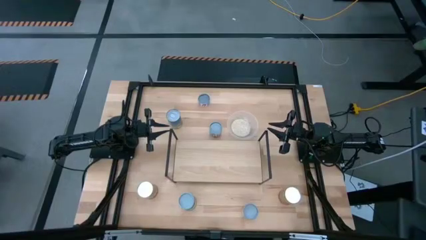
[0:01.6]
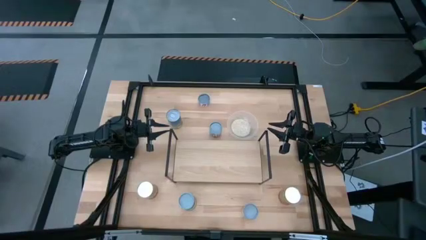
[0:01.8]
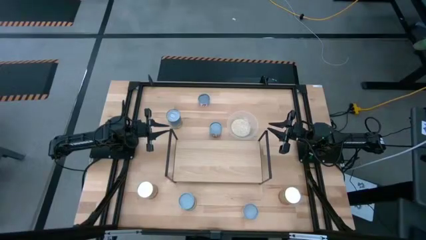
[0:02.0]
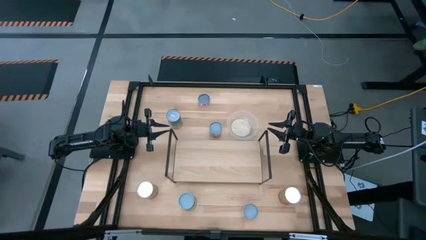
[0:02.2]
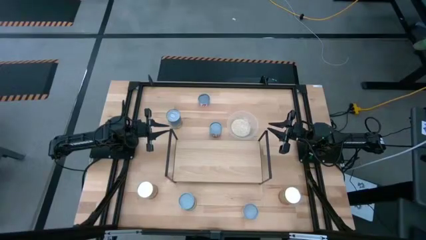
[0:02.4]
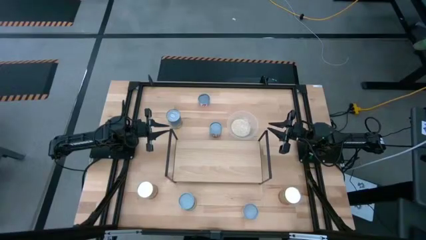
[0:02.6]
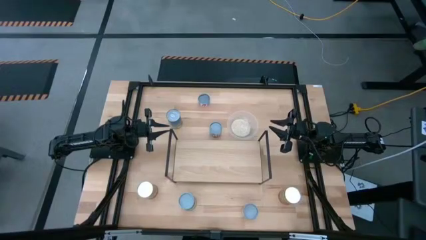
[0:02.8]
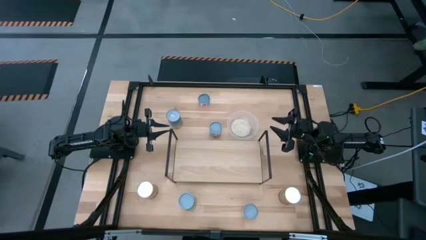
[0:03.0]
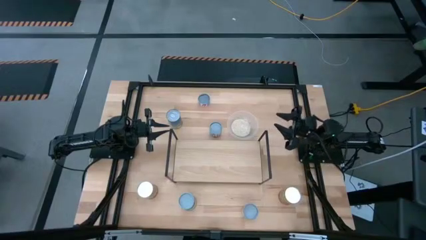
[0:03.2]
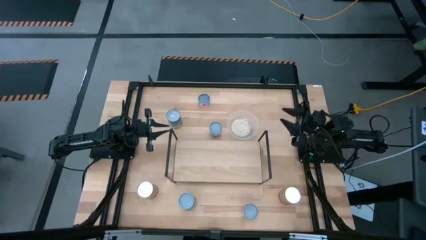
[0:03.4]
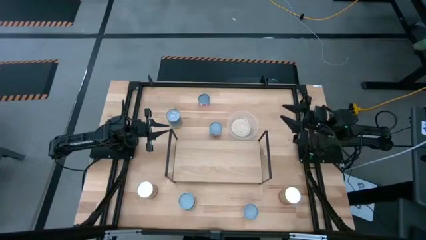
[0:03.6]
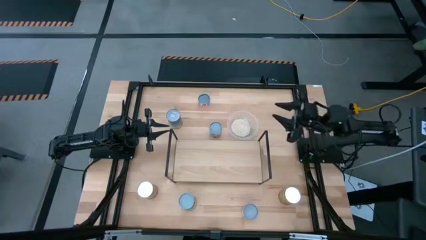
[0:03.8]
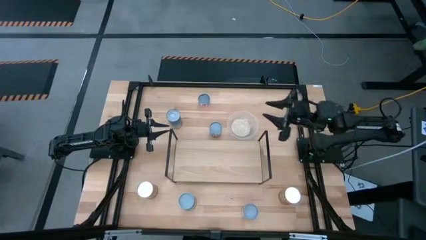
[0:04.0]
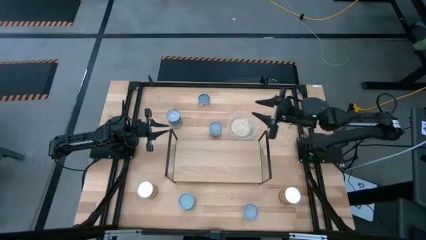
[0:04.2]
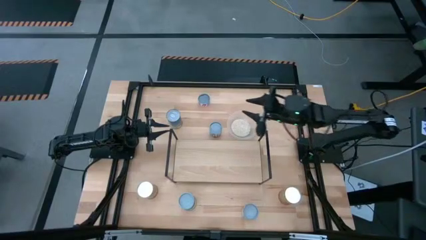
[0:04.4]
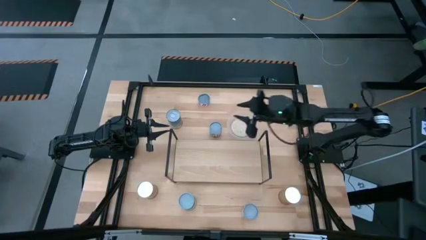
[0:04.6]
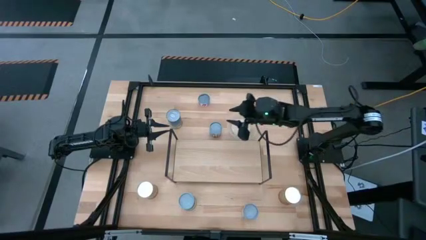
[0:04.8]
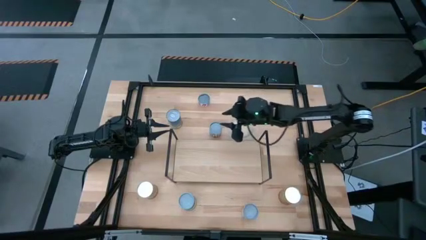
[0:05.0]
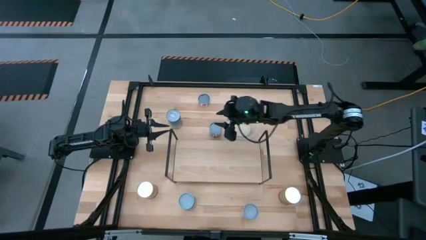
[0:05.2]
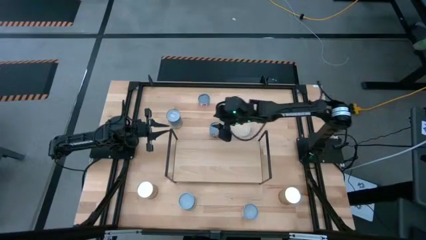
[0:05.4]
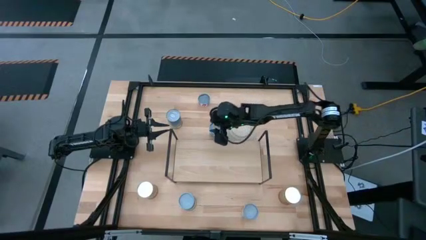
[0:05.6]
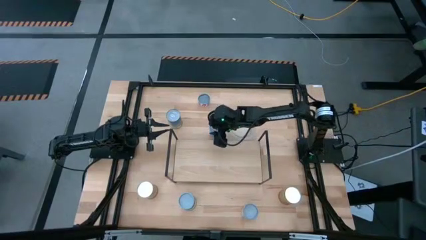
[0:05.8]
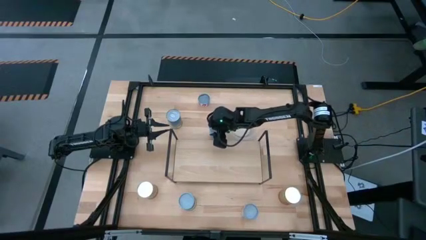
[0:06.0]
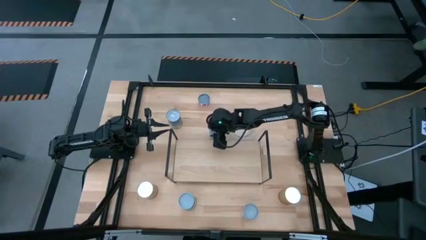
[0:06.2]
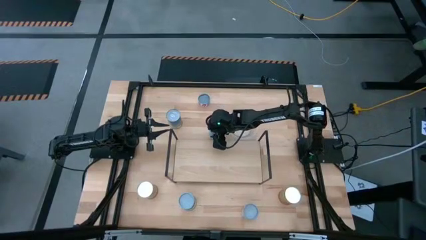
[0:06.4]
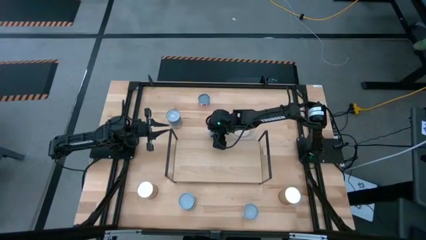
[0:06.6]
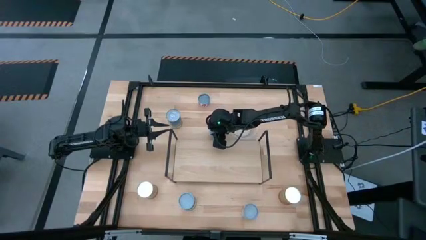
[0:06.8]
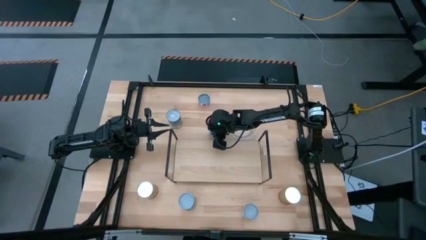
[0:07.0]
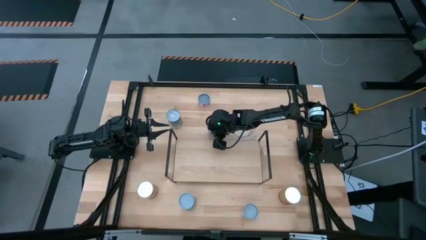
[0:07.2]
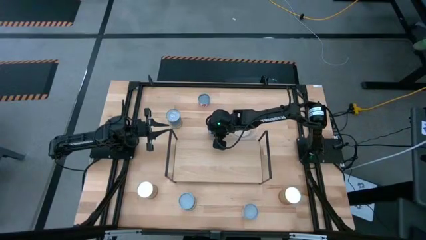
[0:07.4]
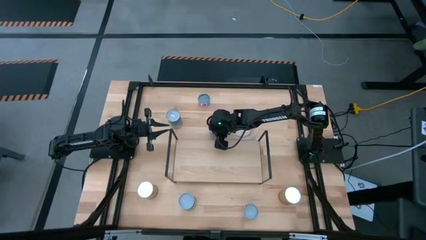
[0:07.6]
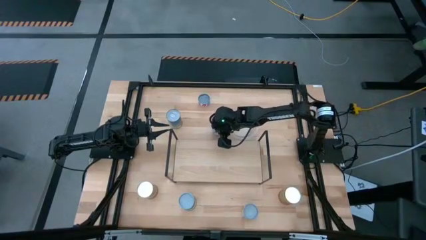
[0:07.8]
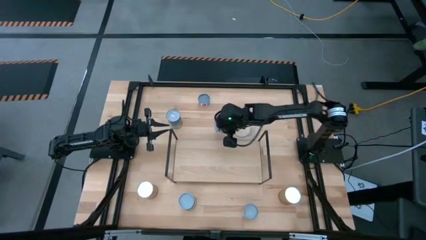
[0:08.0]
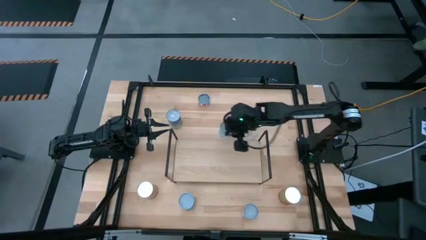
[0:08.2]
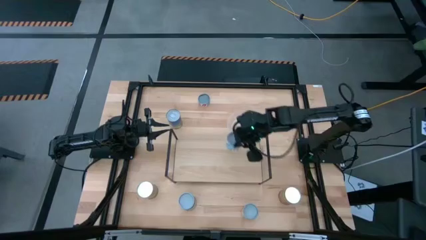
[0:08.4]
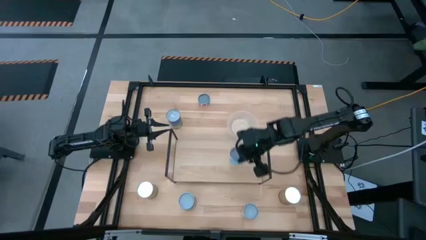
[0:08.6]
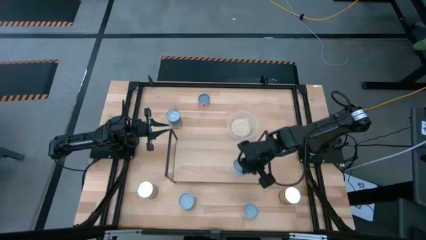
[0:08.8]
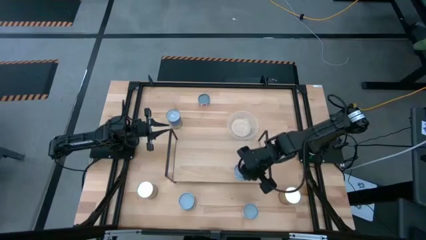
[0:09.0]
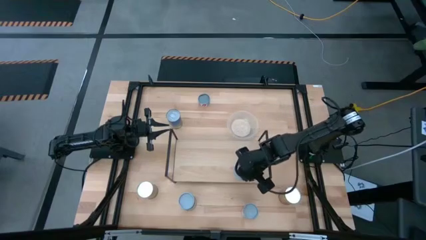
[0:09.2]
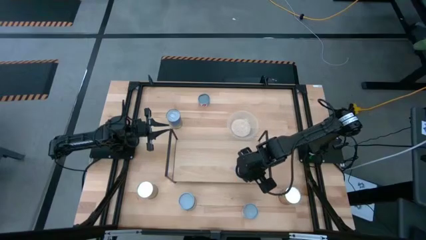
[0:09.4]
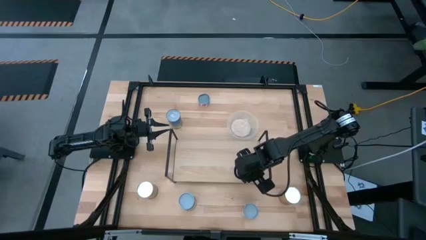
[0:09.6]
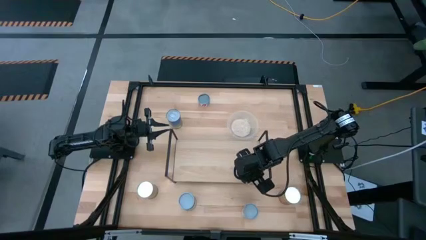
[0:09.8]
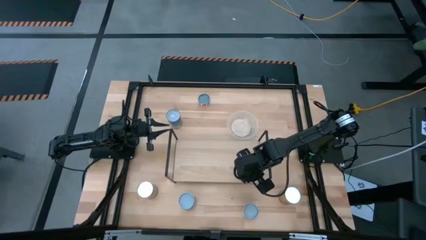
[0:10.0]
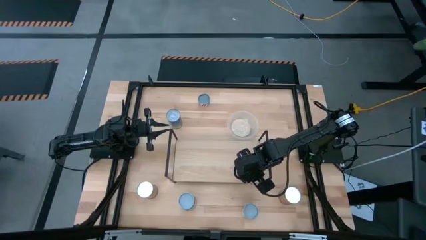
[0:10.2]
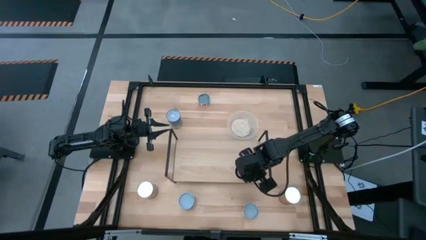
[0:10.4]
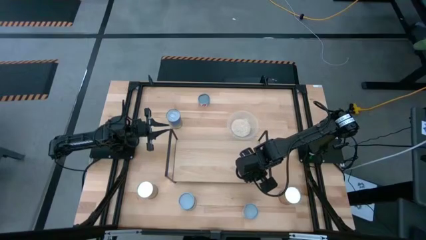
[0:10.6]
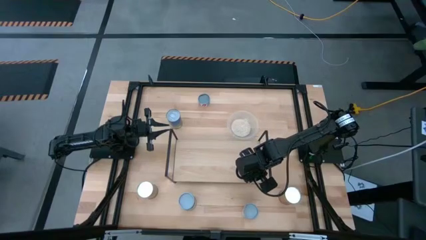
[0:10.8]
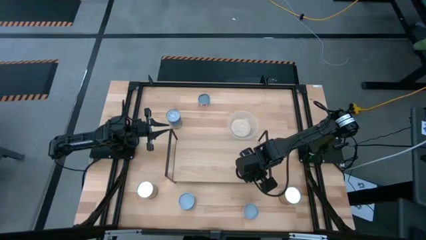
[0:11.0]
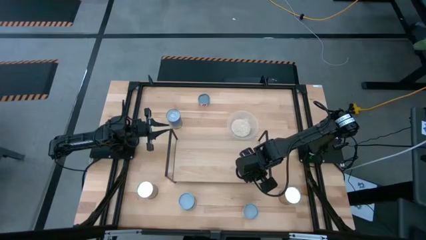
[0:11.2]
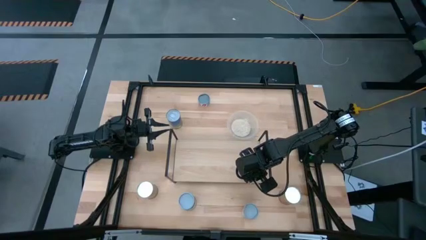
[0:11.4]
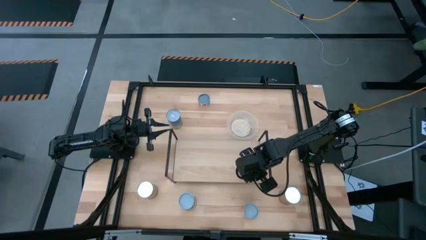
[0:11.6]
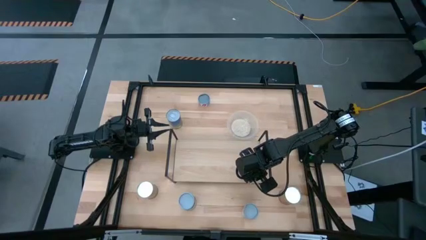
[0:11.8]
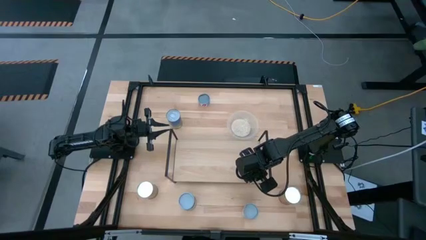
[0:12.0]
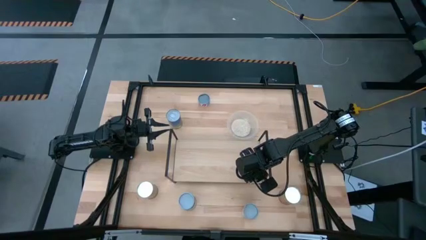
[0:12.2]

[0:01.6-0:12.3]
Task: Pick and place cans onto a shelf
Put the canned sliced carrots on the shelf
